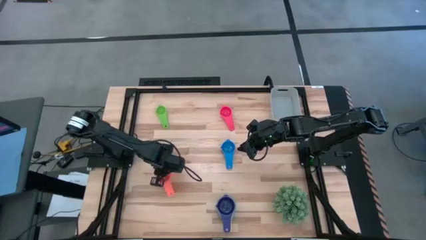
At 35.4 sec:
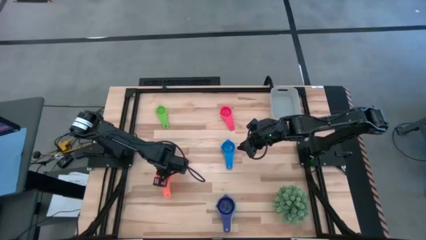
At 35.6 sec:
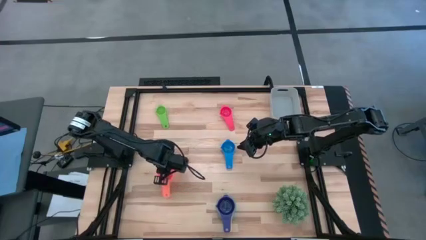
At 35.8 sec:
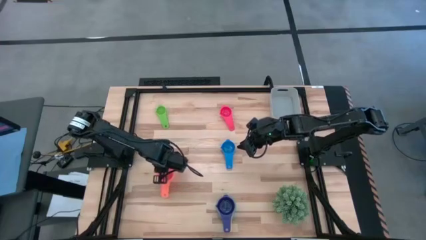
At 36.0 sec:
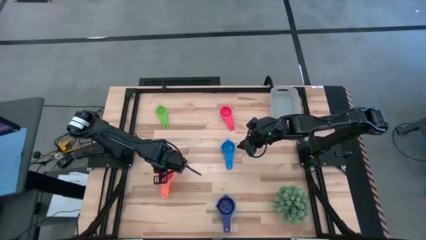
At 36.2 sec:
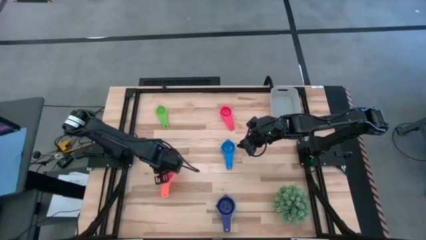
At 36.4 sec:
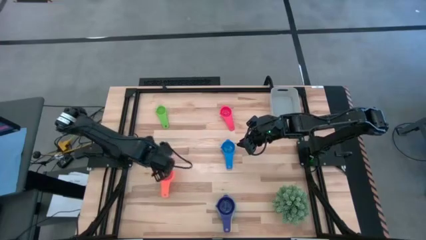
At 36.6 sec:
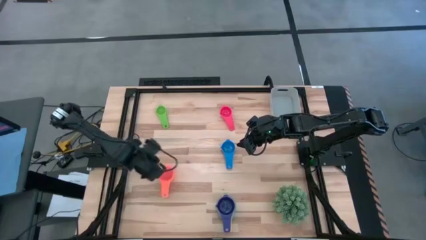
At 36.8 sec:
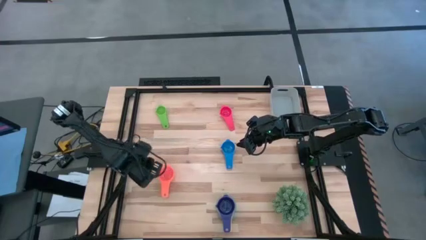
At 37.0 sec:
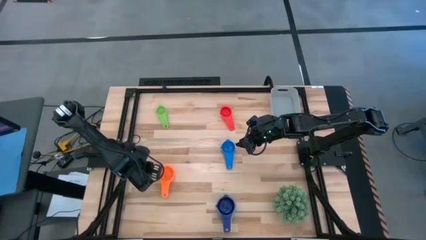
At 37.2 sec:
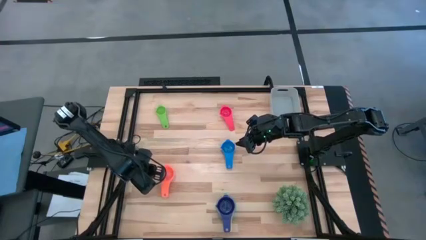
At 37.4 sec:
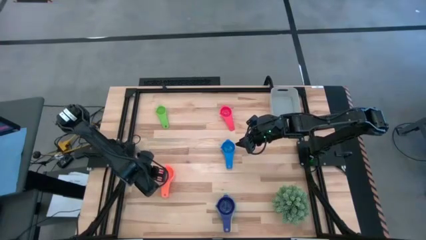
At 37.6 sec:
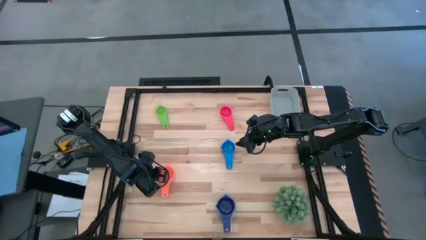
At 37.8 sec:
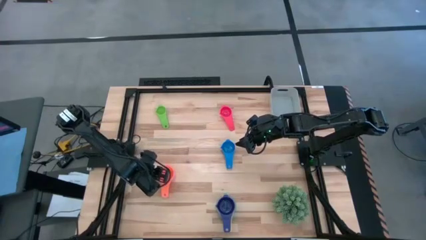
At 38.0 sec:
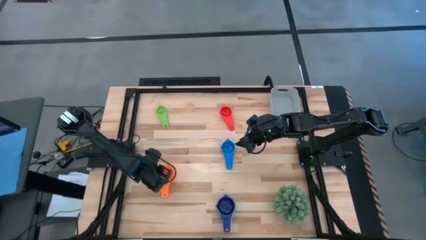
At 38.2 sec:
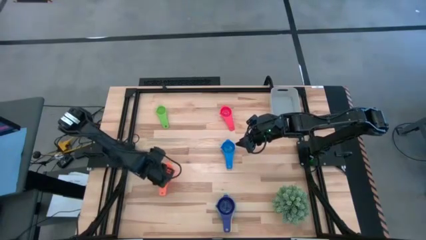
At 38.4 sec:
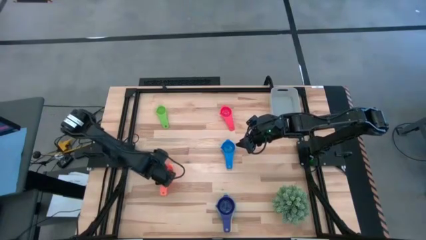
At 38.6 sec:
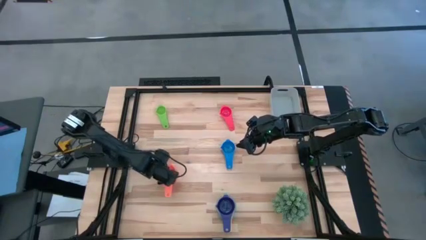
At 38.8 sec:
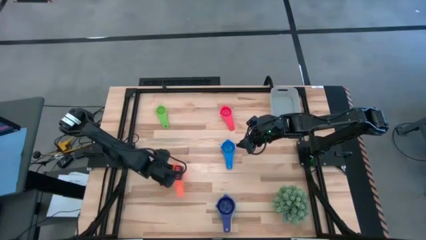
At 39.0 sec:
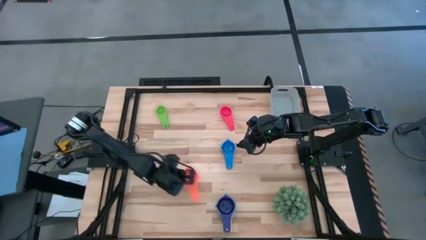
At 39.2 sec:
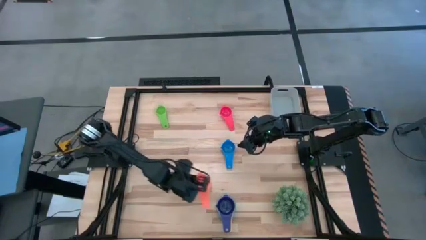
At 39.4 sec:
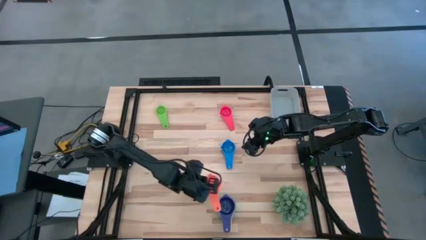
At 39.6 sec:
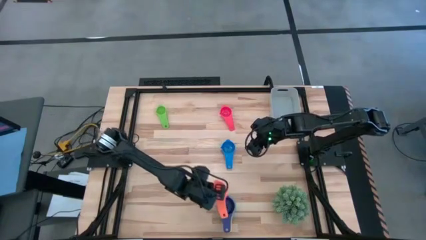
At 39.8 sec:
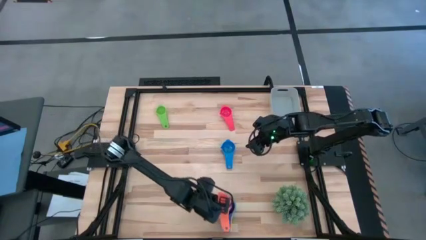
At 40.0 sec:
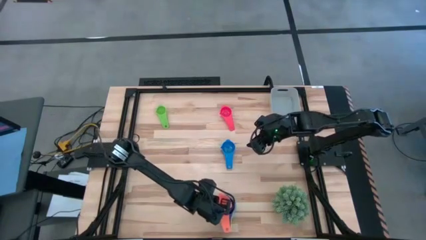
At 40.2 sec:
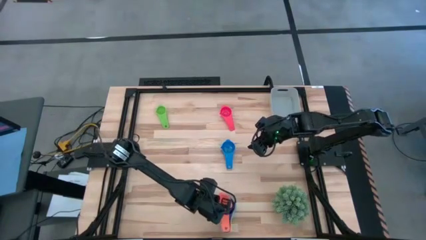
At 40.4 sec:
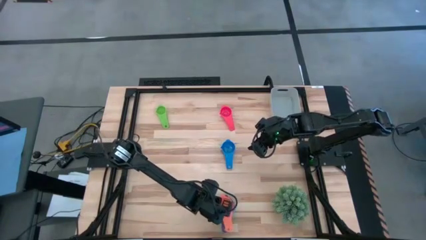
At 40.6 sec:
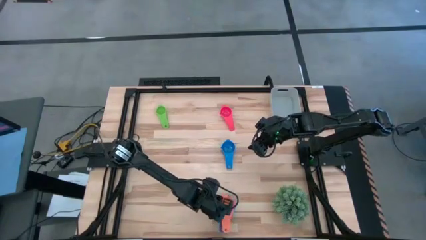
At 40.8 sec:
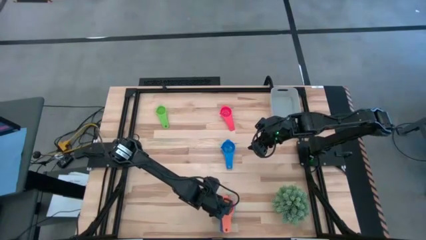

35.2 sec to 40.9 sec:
Task: Nest measuring cups in basket
Stack the orange measuring cup on top of the dark blue of measuring cup

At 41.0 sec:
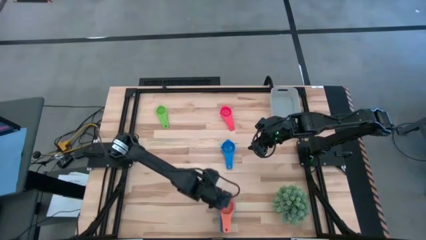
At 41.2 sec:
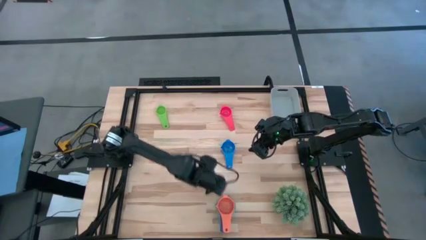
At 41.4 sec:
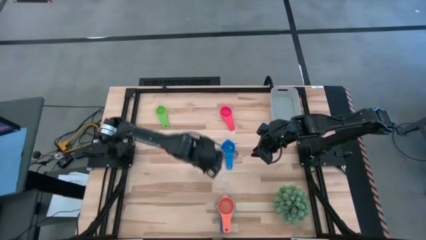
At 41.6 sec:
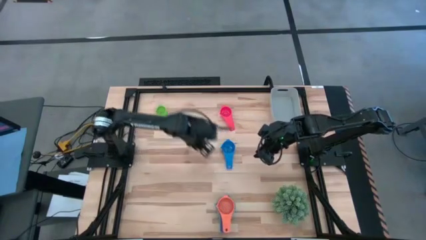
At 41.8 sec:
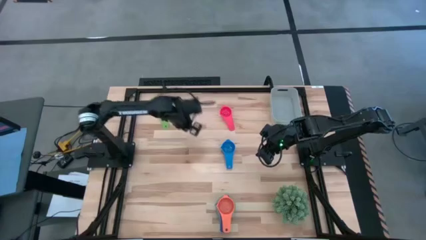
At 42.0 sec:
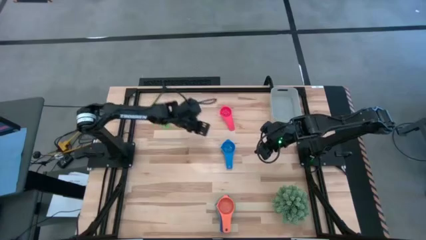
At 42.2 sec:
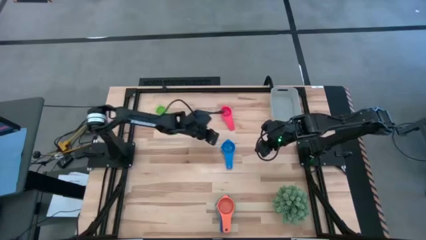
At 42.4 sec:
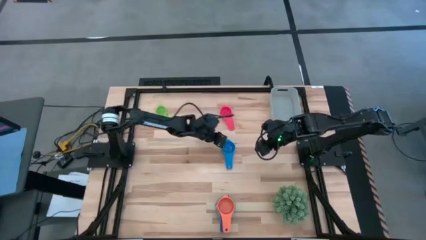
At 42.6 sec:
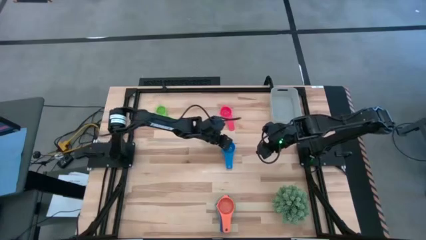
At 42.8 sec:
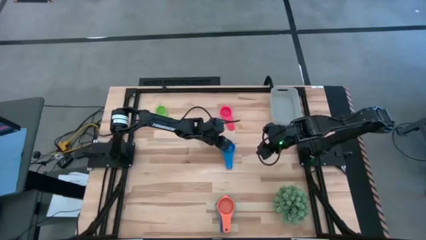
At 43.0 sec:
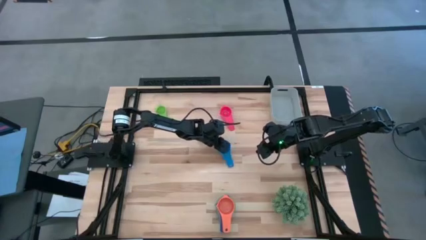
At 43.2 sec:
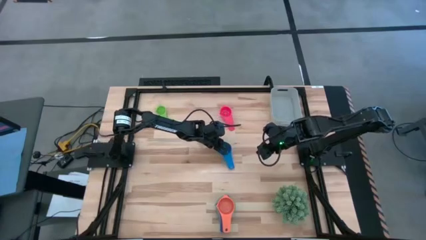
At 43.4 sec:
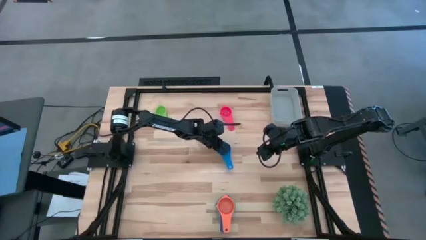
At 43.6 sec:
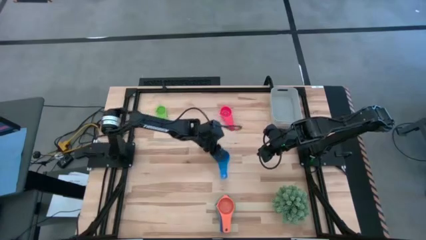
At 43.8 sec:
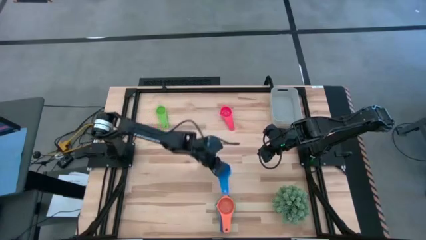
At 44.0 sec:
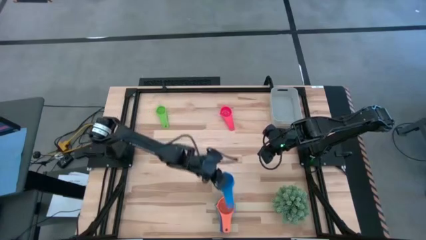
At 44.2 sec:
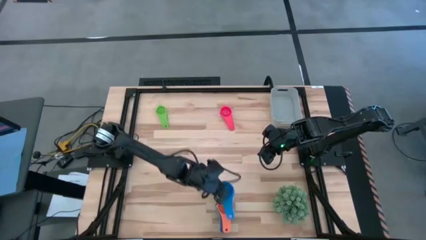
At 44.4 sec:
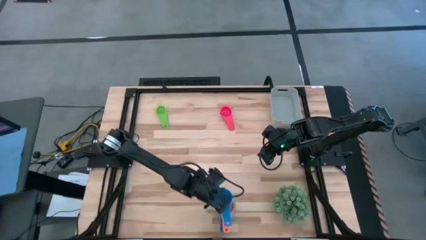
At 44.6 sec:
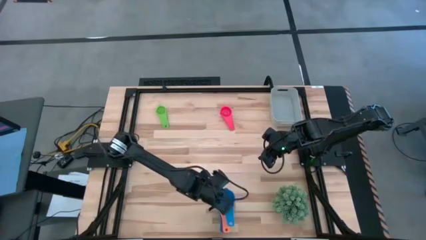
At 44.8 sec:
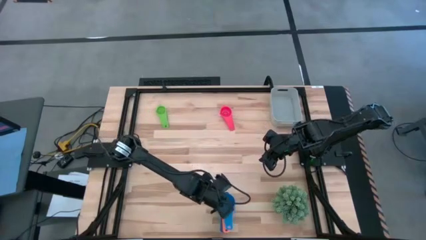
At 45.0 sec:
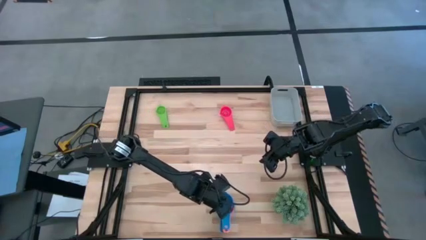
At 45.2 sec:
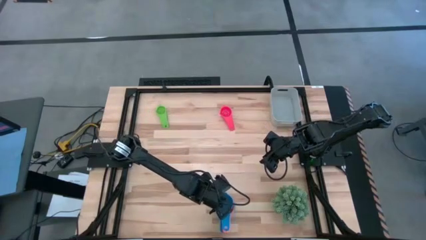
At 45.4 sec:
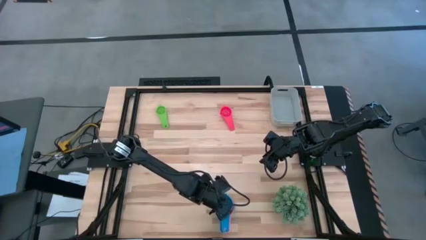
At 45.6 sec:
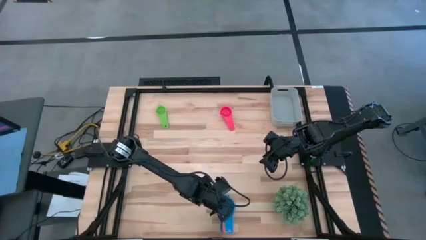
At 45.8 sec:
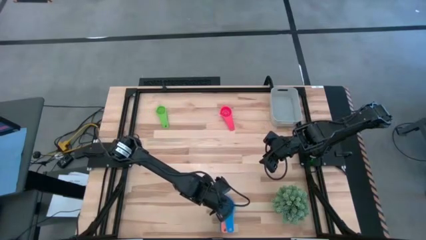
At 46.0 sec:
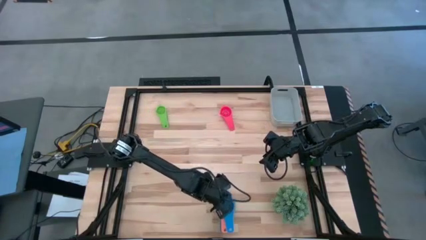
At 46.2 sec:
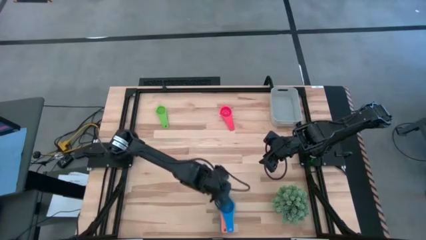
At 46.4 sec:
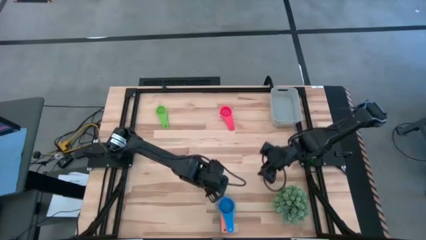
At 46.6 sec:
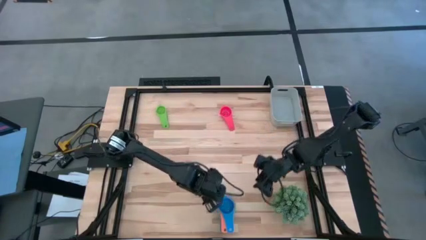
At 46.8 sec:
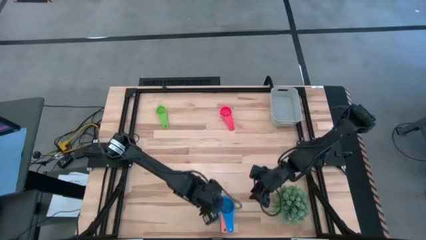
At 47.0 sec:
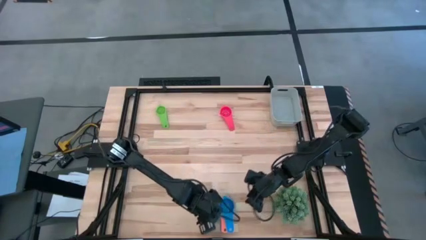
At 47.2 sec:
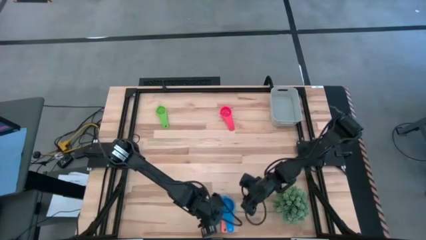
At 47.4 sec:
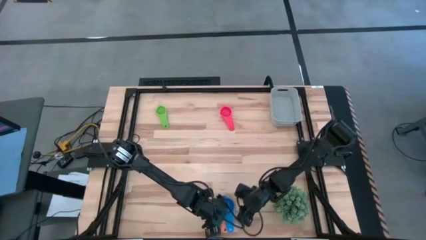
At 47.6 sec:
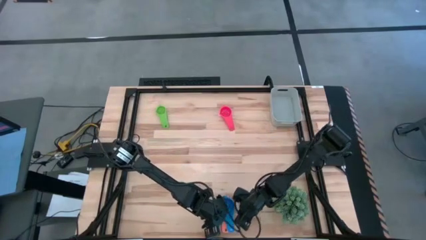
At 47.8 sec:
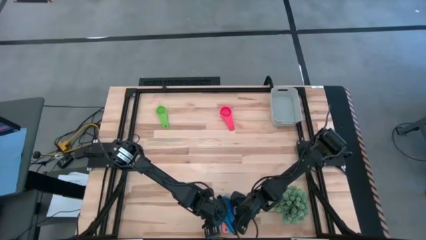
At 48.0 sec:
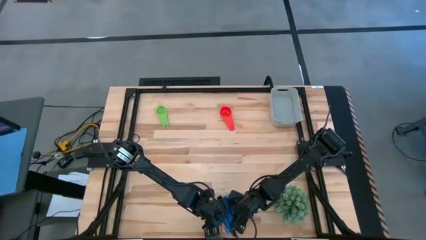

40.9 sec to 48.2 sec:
Stack the blue measuring cup on top of the orange of measuring cup
